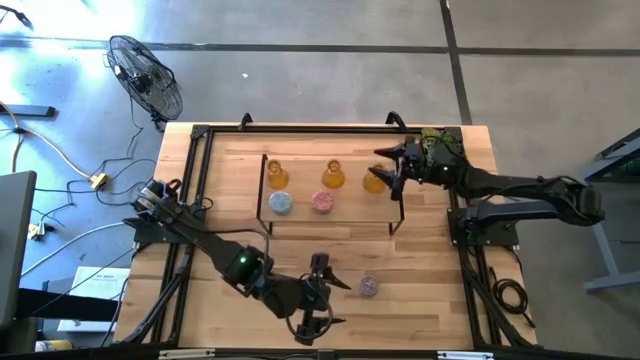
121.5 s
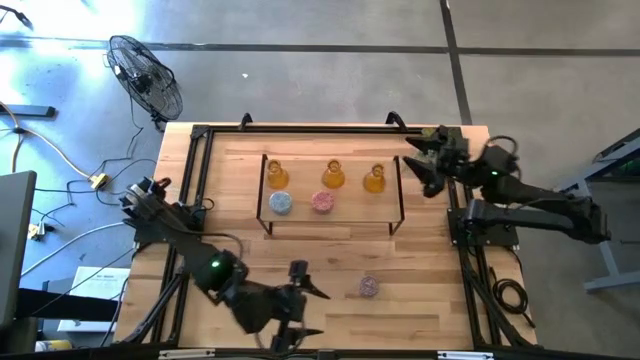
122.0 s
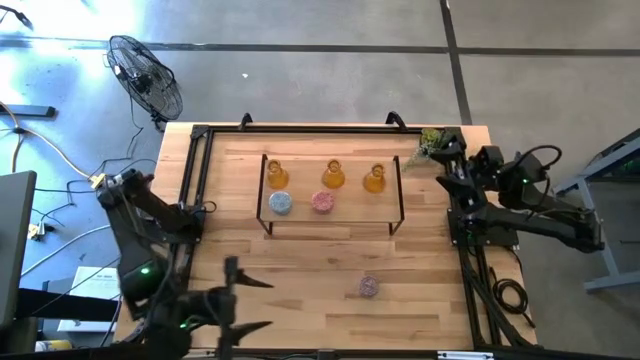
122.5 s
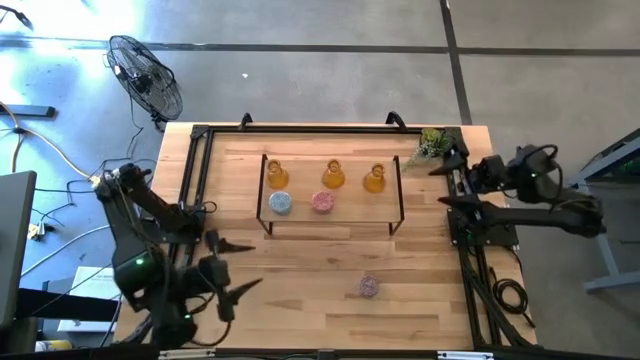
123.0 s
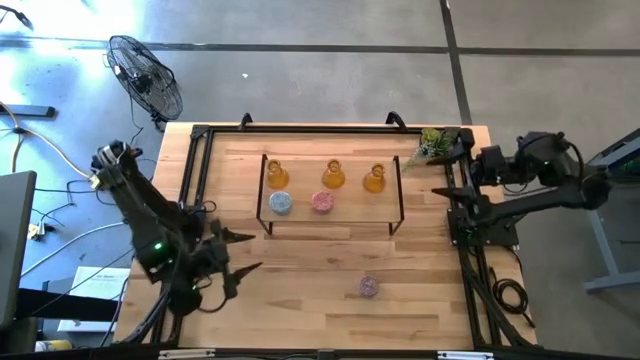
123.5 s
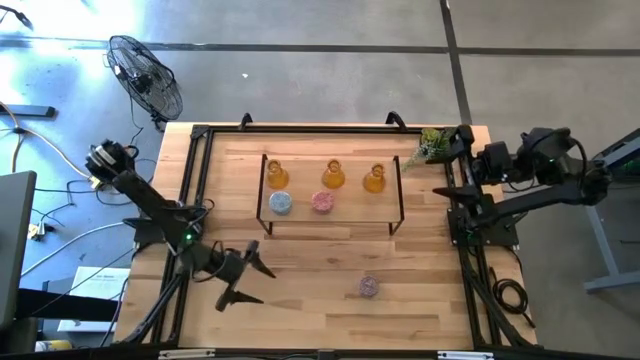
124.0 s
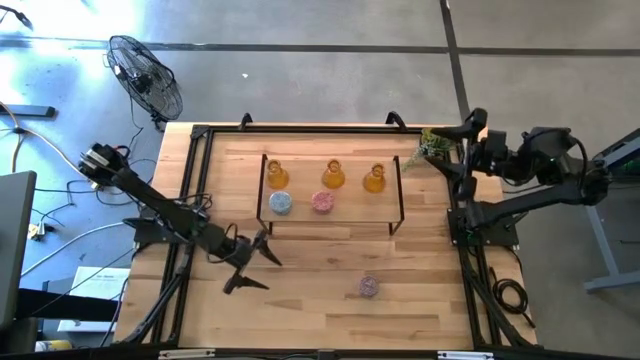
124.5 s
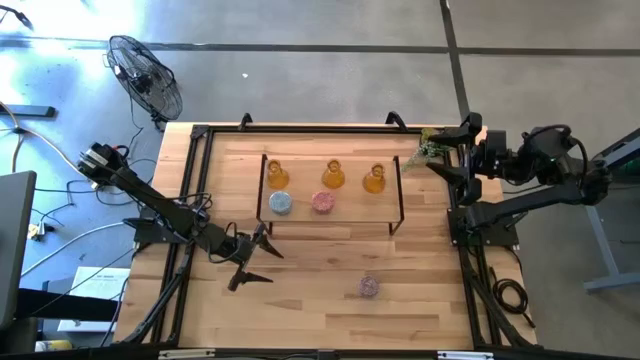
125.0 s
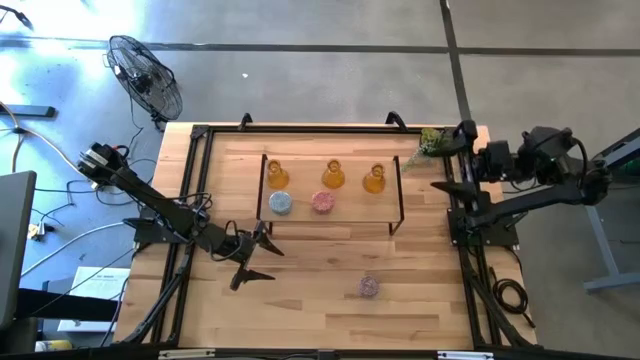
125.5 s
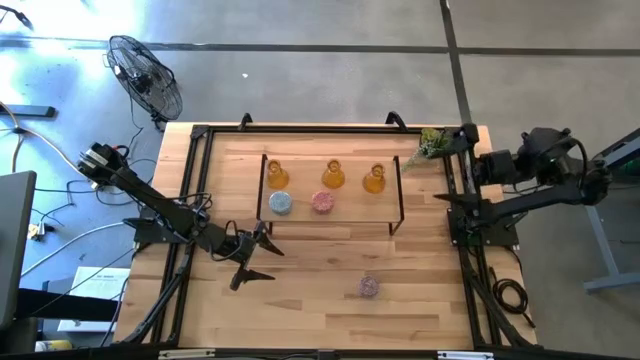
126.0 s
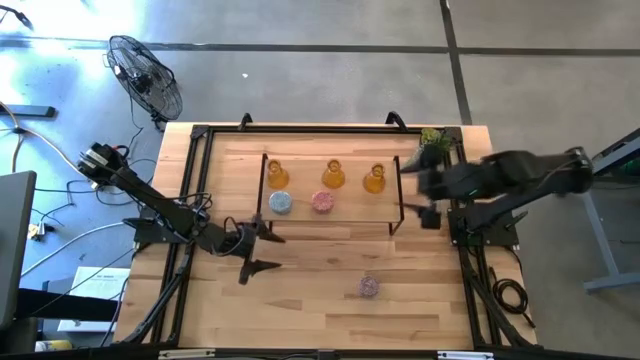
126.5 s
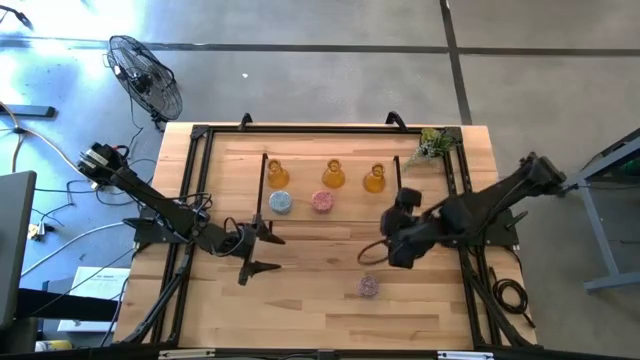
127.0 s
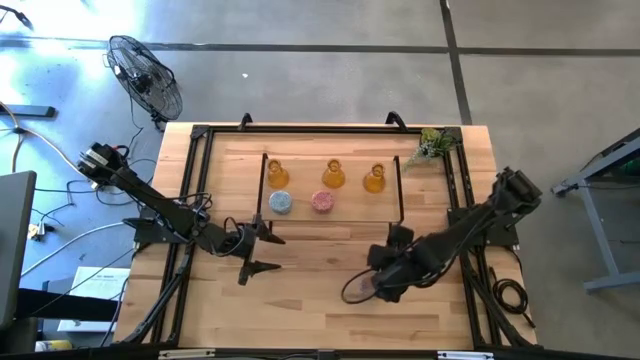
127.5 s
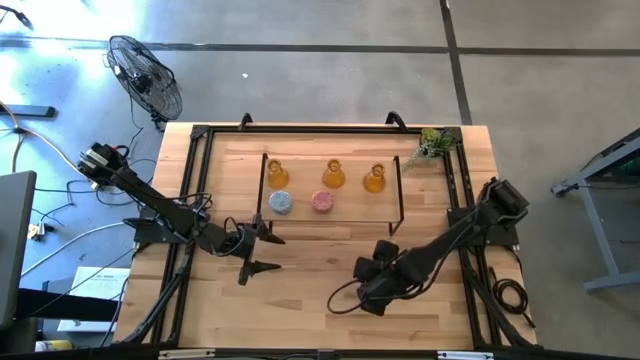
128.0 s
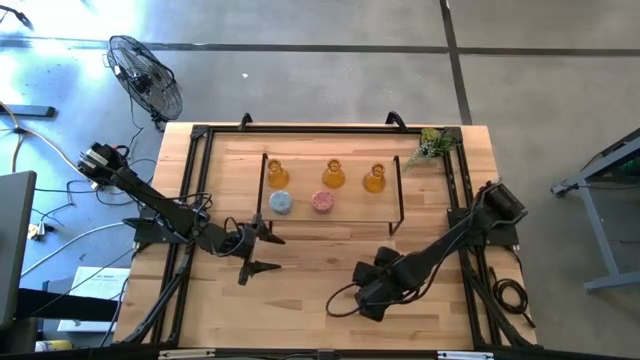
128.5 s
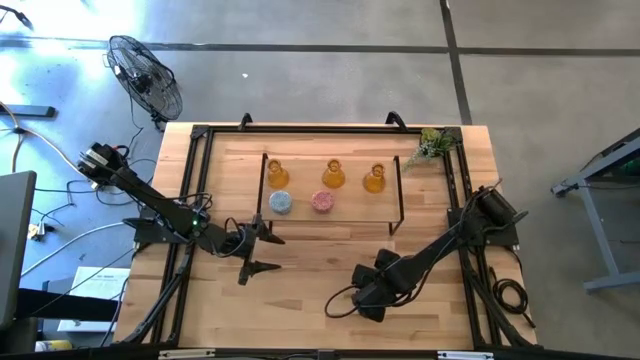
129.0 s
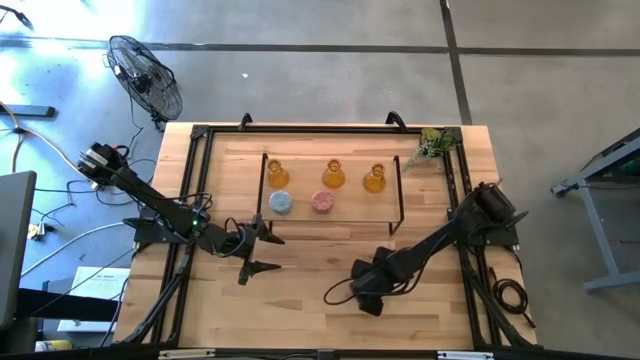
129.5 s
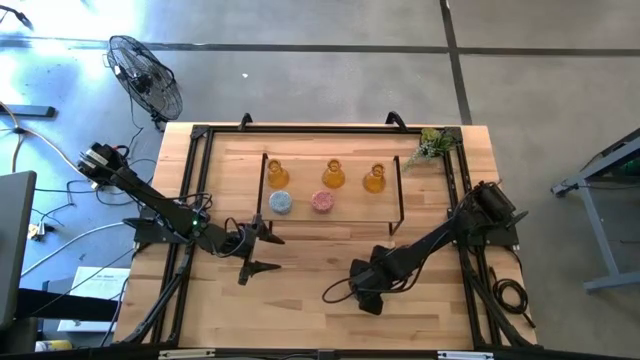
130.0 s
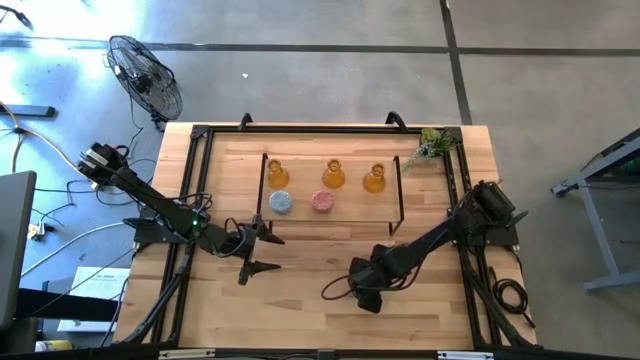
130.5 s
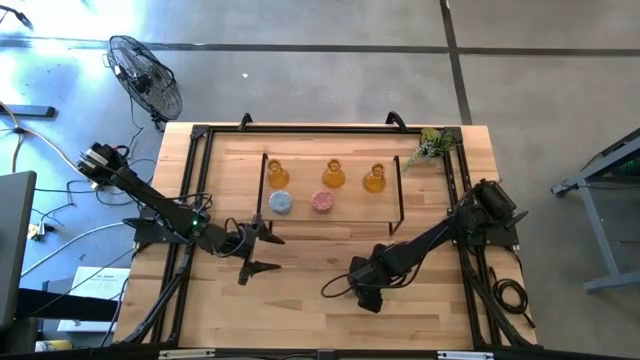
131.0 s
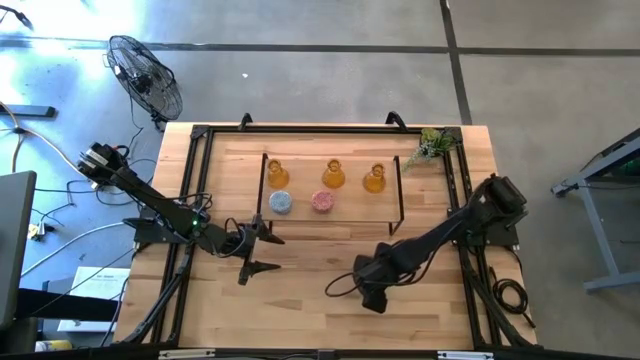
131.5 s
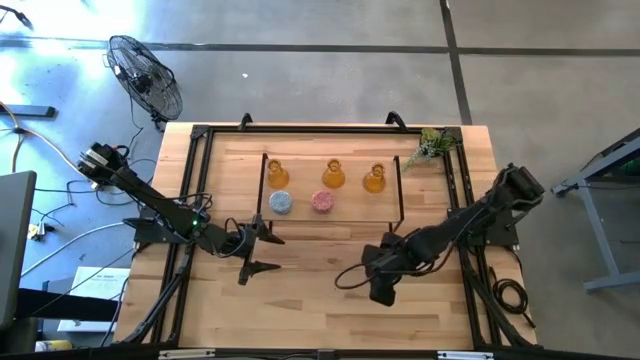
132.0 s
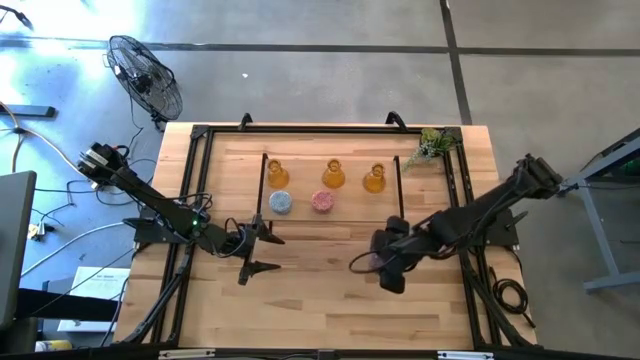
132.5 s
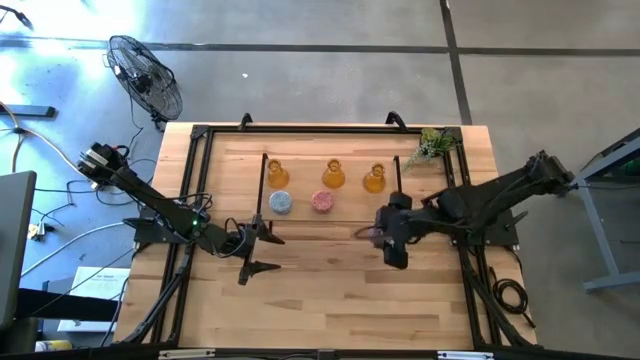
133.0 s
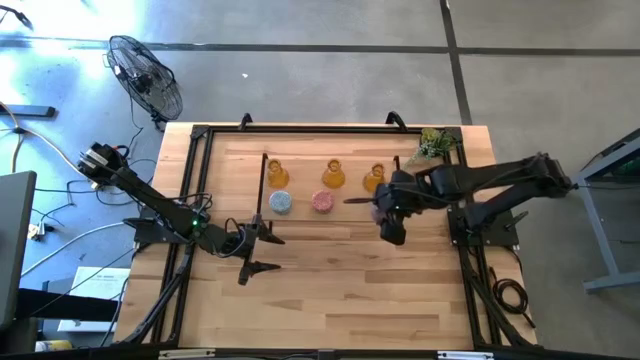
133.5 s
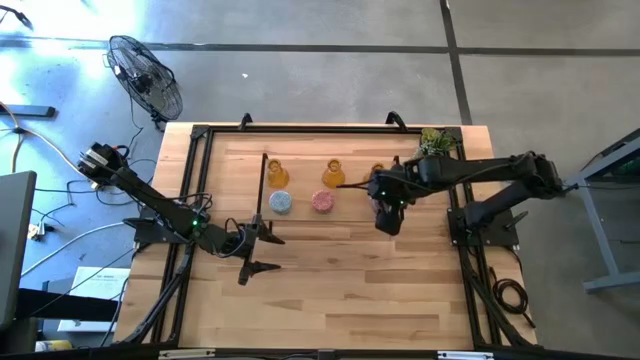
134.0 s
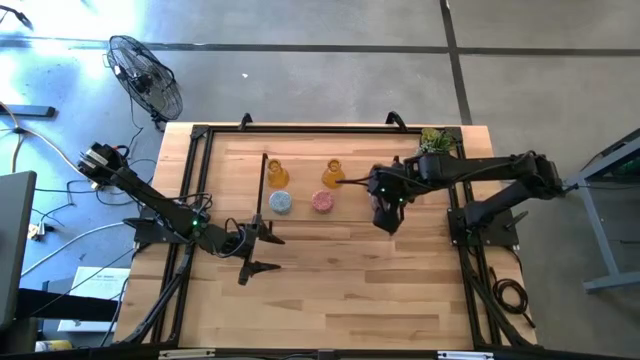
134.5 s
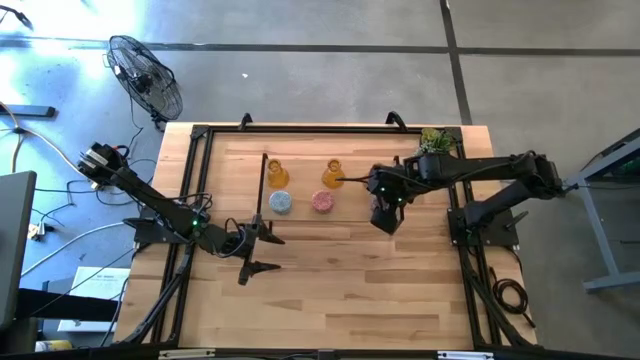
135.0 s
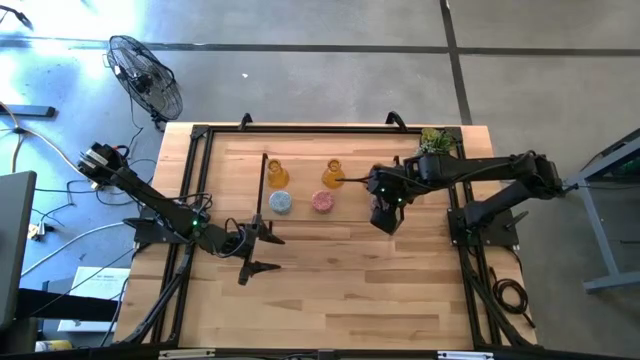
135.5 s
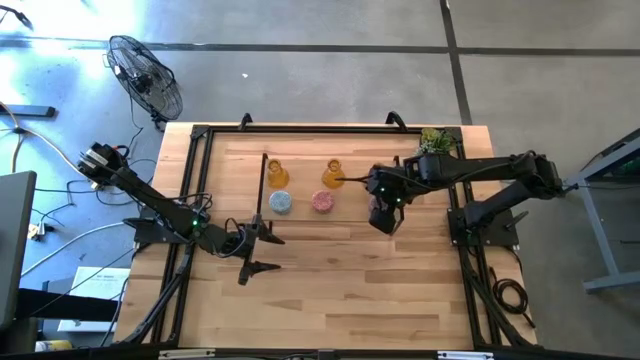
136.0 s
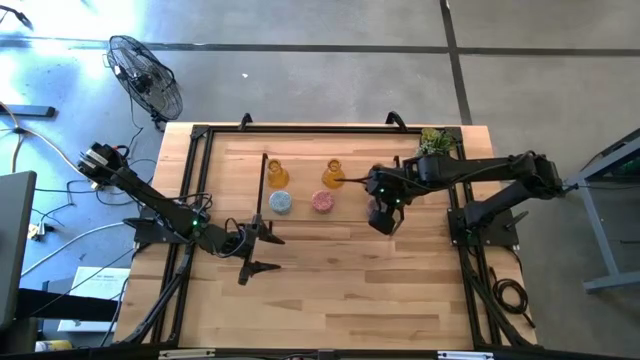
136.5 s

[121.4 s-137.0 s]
Task: Pick & Place candle stick holders
Put the red scented candle on the shelf aligned with the other scented candle

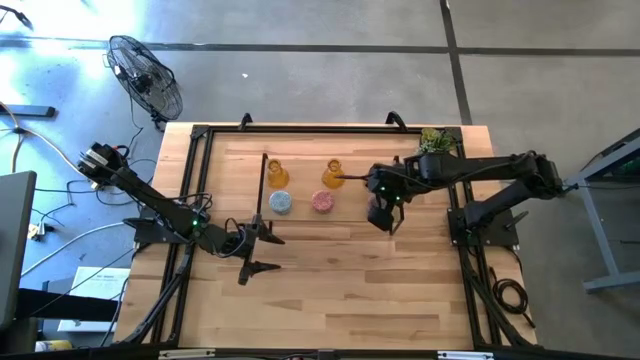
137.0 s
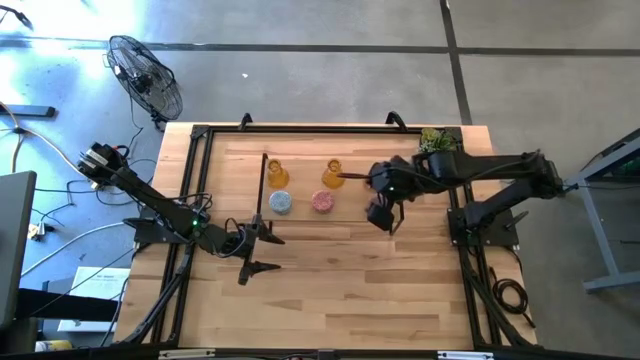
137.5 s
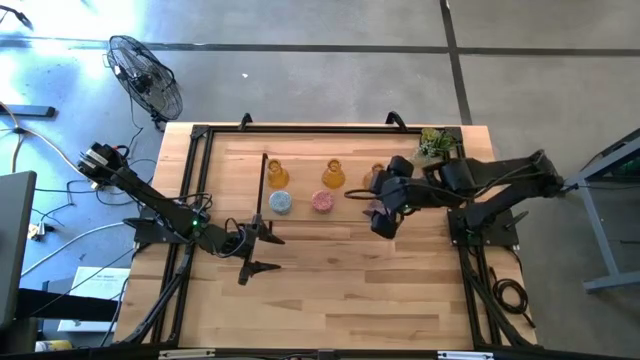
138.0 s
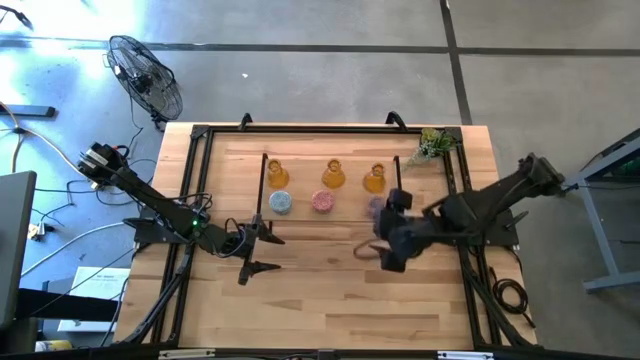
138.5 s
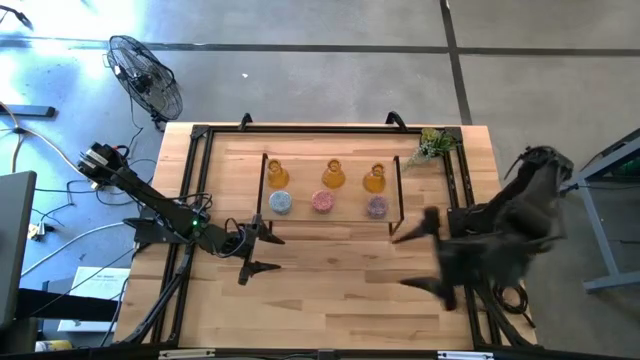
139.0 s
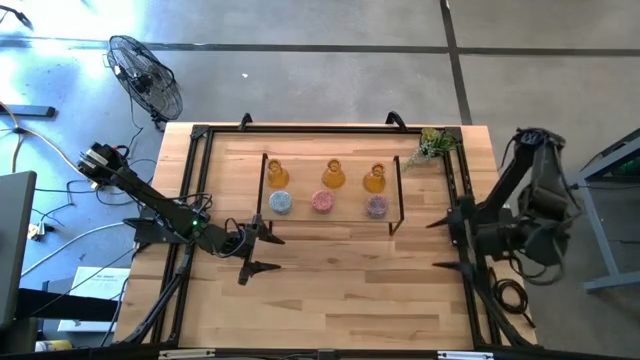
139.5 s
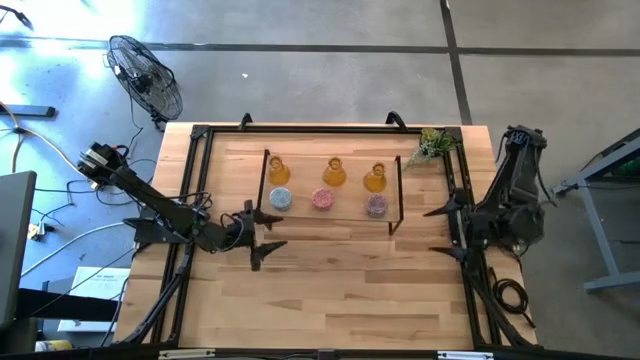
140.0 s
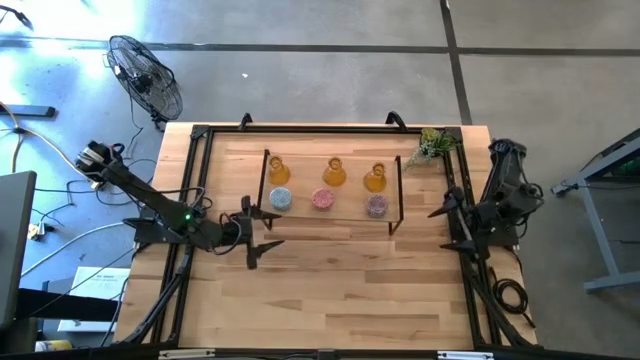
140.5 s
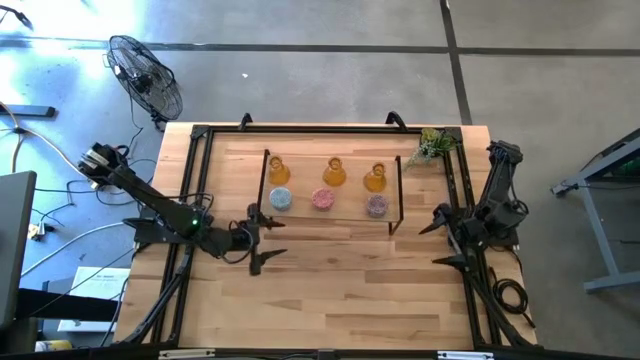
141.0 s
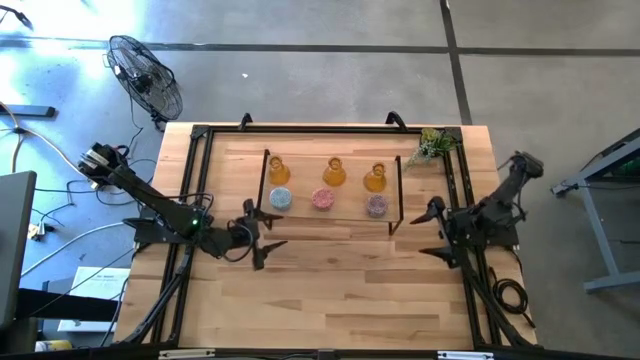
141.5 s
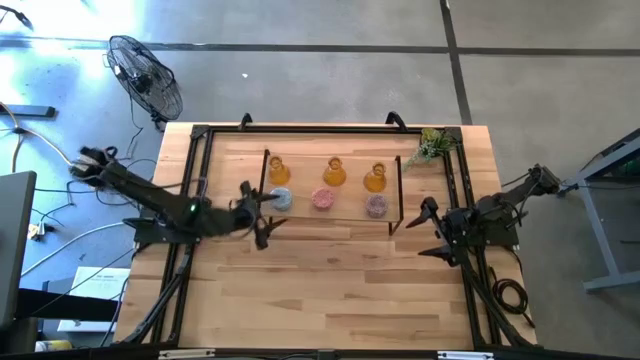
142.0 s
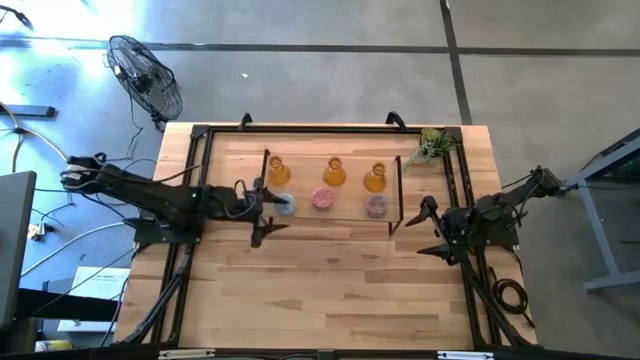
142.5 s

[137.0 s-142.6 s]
Adjust the blue scented candle on the shelf

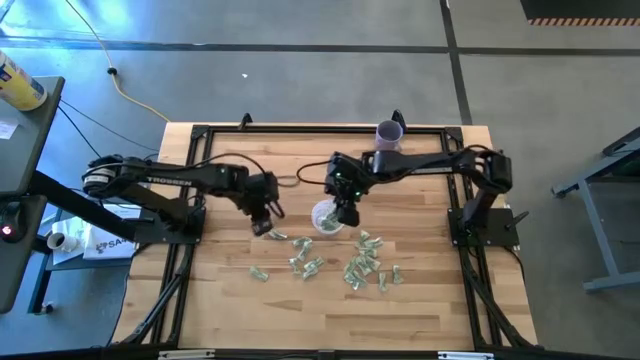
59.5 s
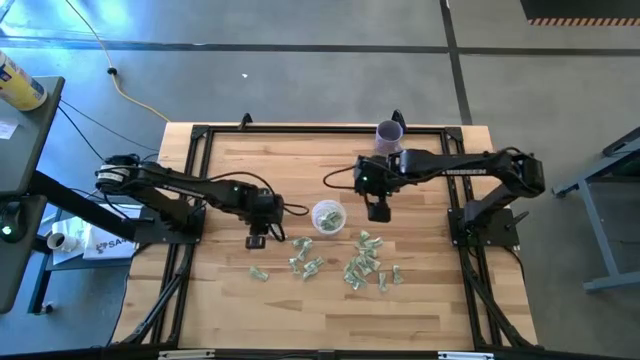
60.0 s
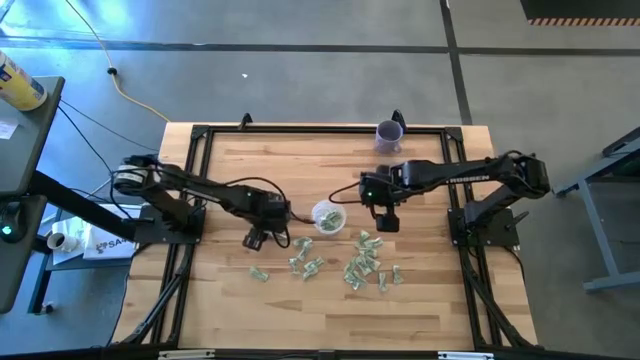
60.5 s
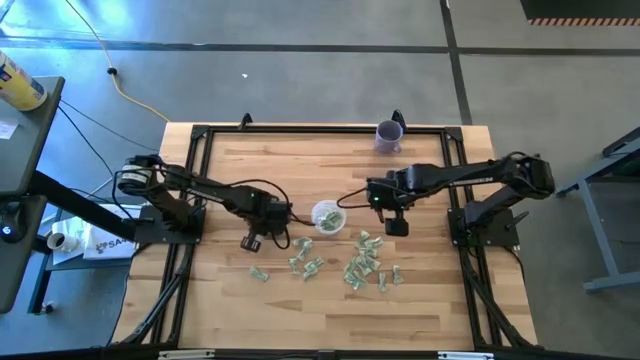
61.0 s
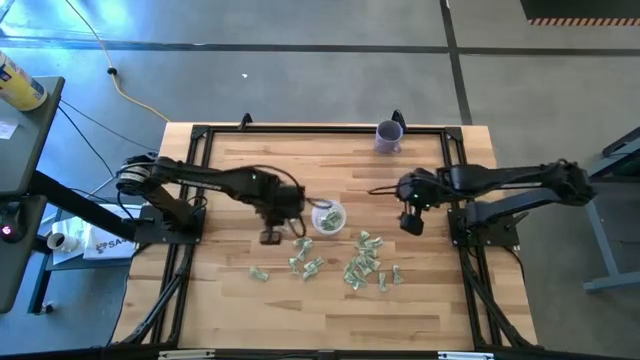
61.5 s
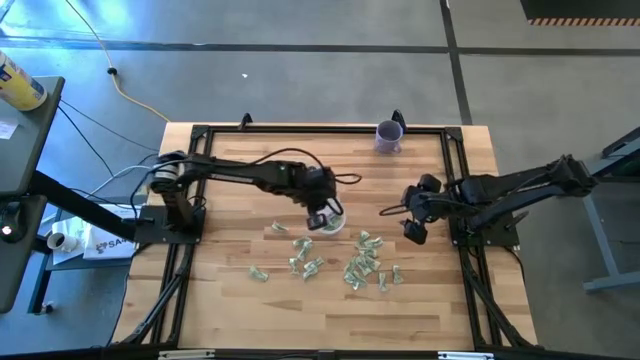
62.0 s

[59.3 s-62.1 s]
Task: Pick and place Stevia / Truvia into bins
Put the green stevia packet into the transparent bin
